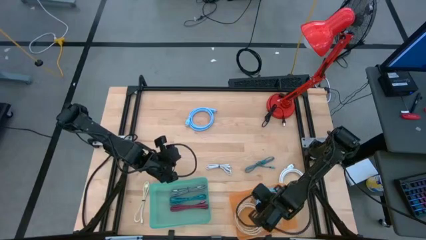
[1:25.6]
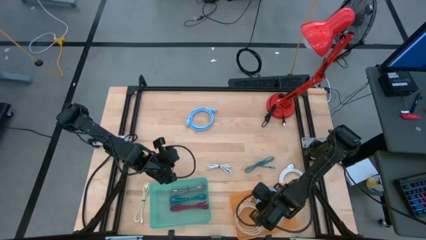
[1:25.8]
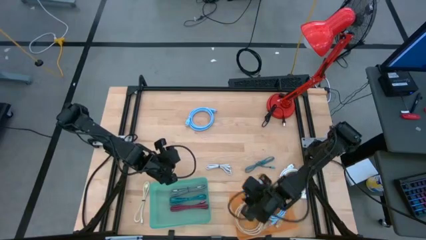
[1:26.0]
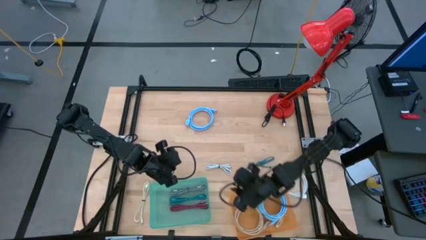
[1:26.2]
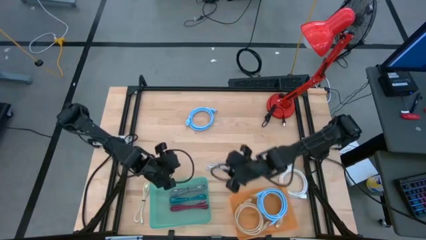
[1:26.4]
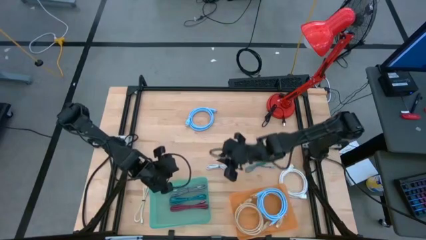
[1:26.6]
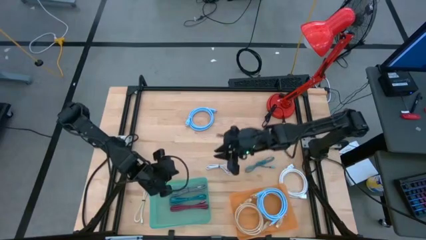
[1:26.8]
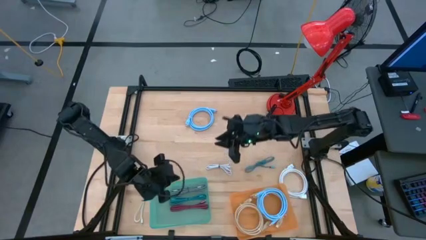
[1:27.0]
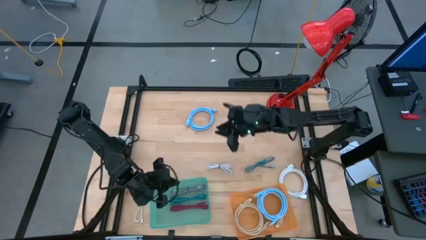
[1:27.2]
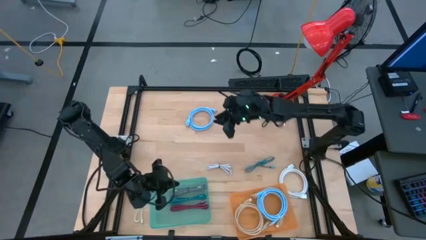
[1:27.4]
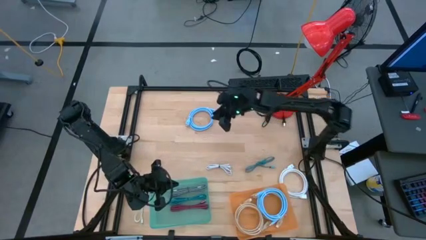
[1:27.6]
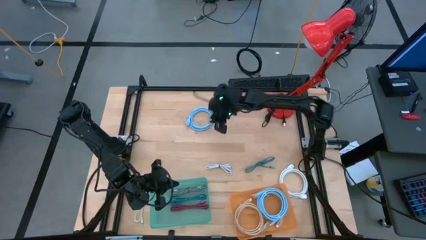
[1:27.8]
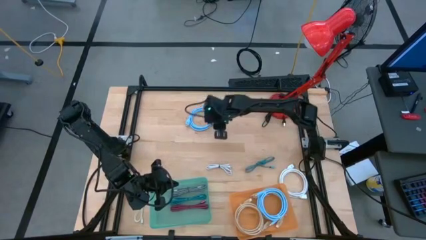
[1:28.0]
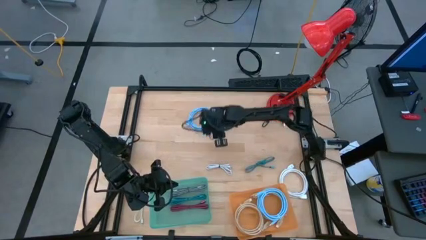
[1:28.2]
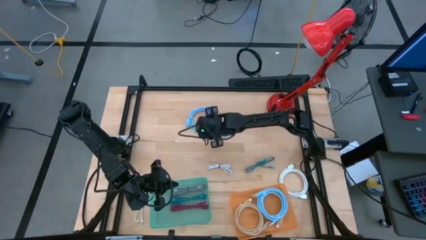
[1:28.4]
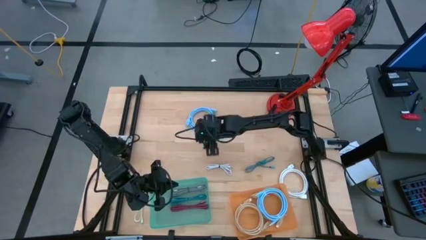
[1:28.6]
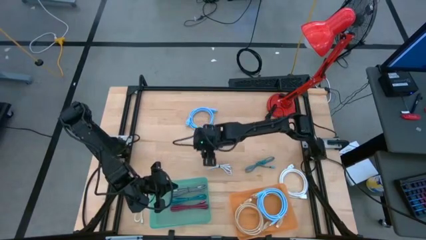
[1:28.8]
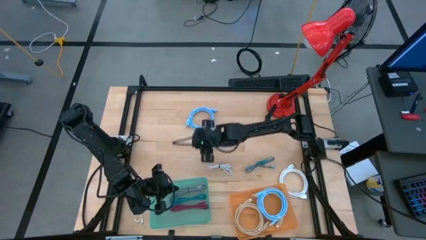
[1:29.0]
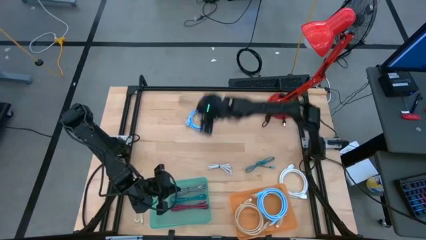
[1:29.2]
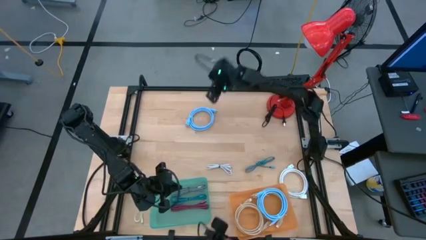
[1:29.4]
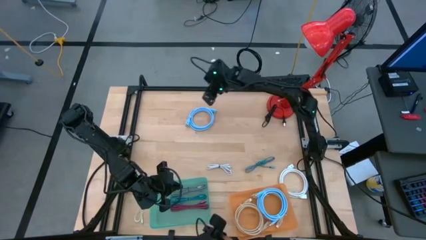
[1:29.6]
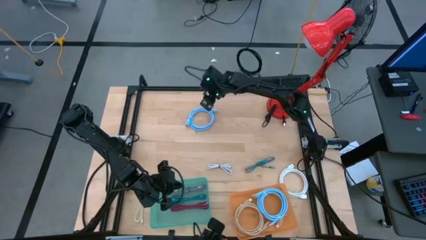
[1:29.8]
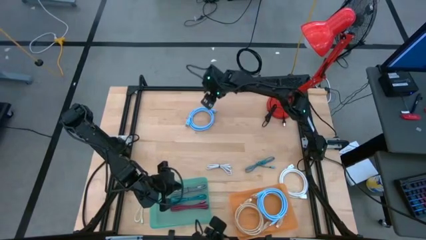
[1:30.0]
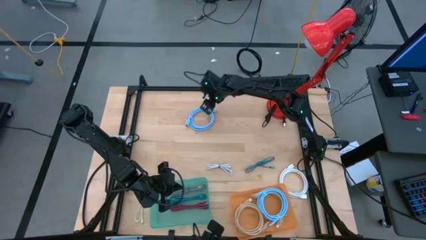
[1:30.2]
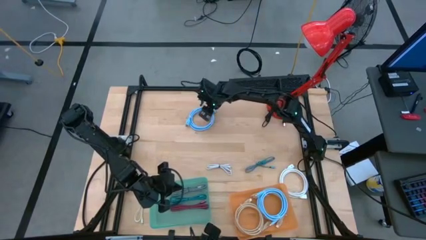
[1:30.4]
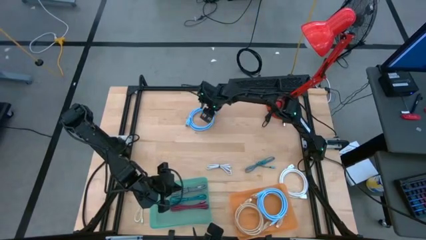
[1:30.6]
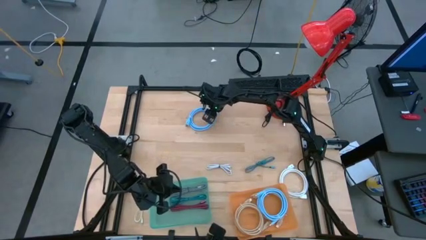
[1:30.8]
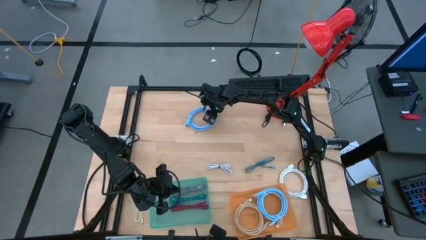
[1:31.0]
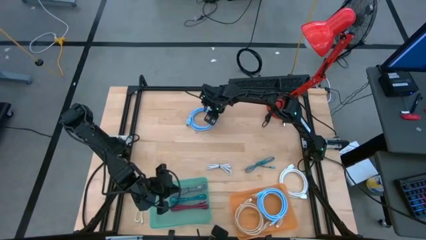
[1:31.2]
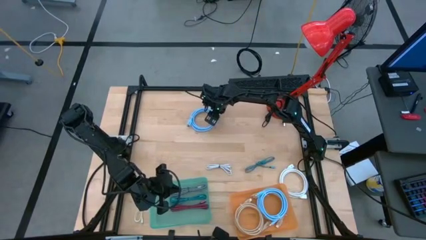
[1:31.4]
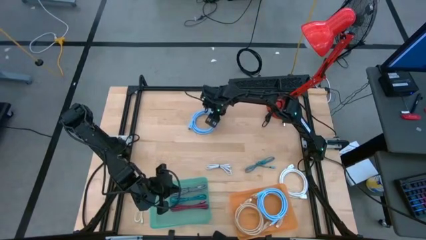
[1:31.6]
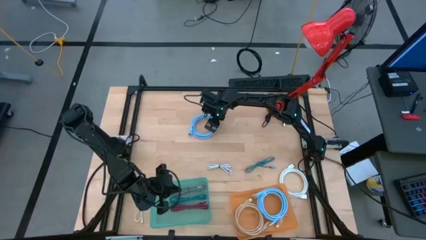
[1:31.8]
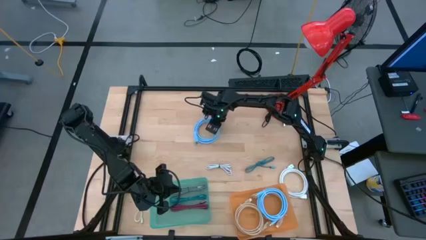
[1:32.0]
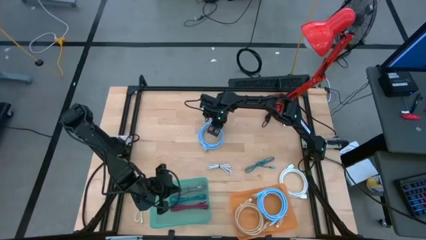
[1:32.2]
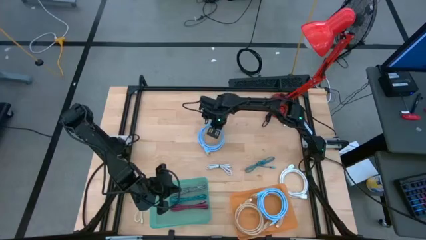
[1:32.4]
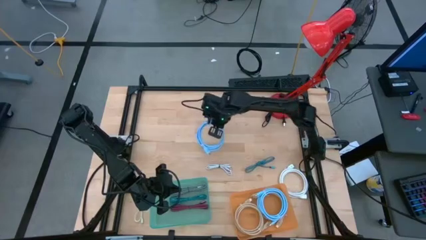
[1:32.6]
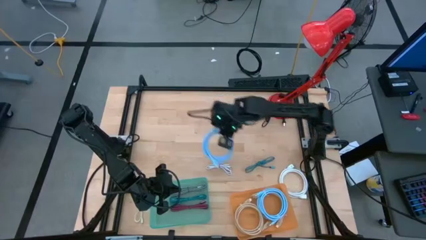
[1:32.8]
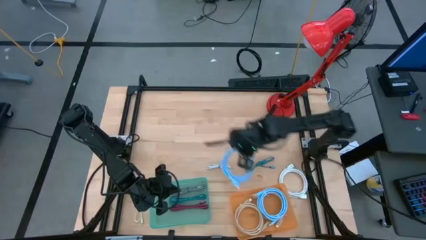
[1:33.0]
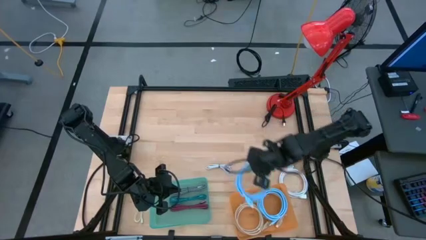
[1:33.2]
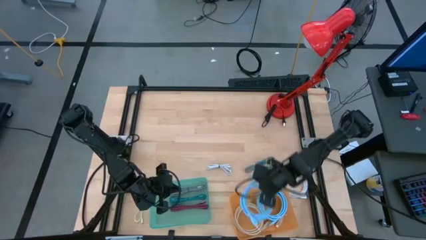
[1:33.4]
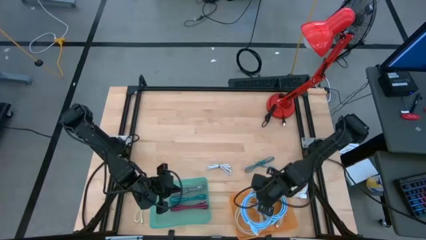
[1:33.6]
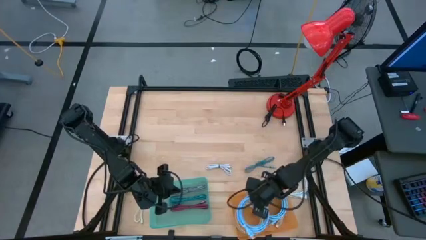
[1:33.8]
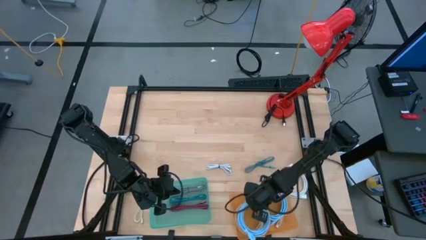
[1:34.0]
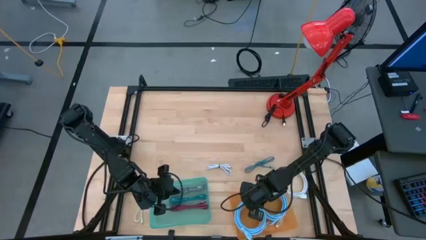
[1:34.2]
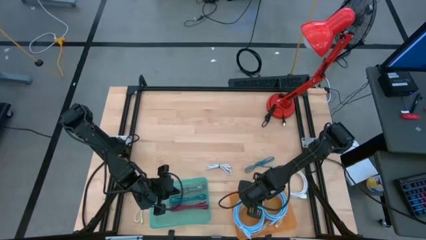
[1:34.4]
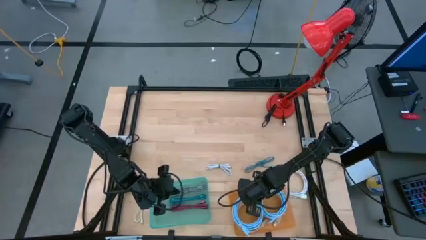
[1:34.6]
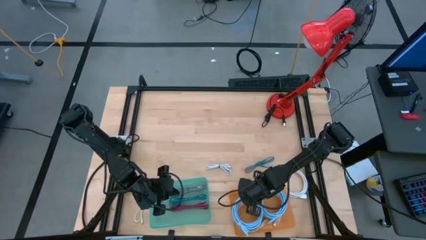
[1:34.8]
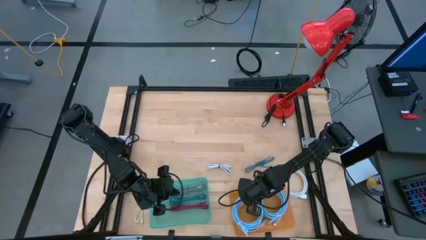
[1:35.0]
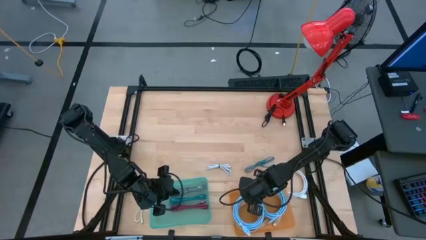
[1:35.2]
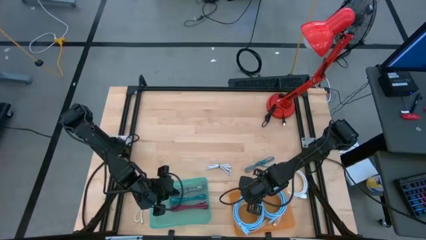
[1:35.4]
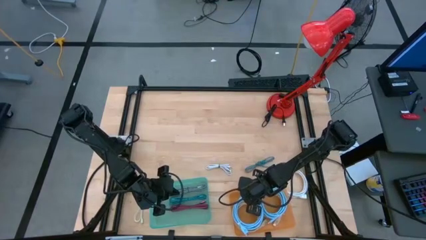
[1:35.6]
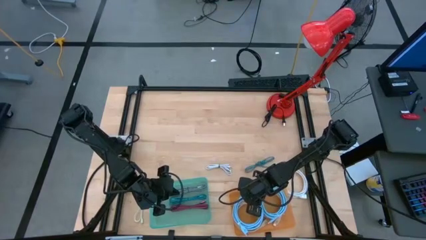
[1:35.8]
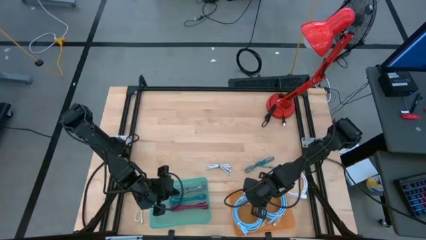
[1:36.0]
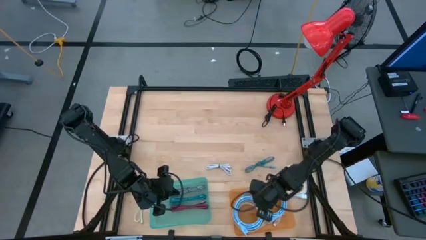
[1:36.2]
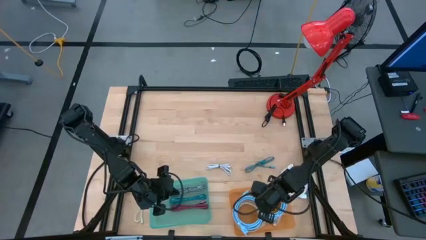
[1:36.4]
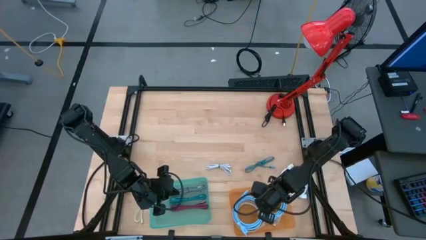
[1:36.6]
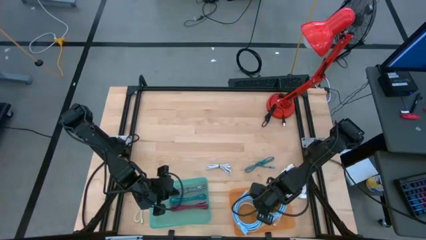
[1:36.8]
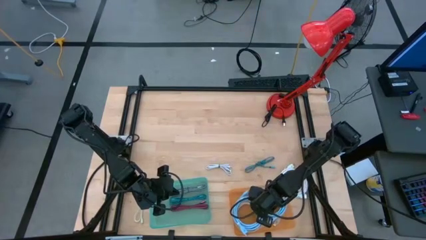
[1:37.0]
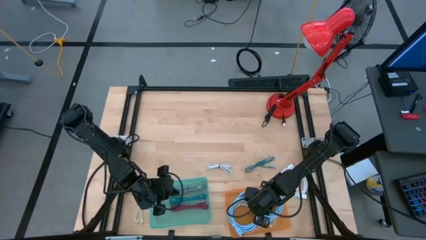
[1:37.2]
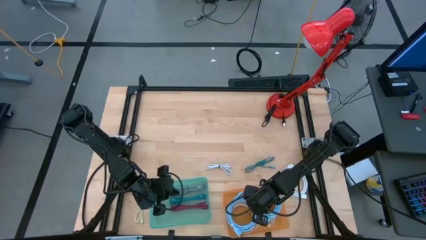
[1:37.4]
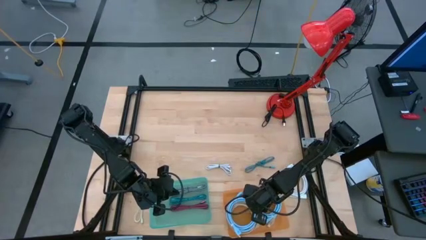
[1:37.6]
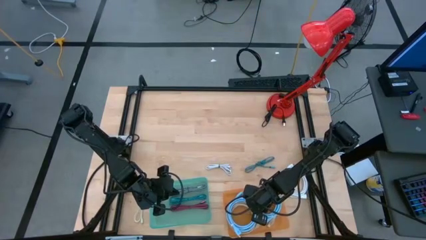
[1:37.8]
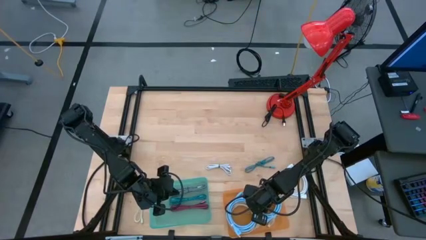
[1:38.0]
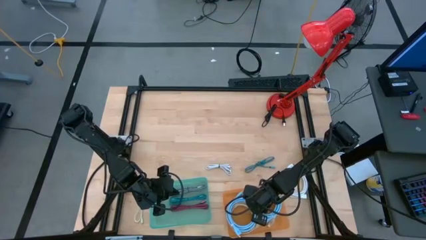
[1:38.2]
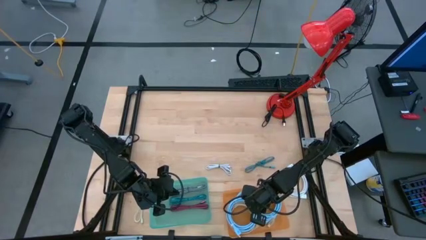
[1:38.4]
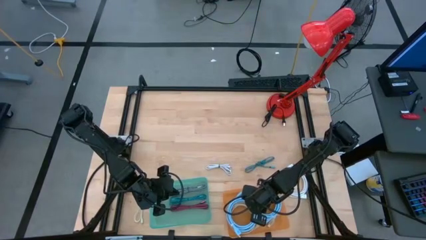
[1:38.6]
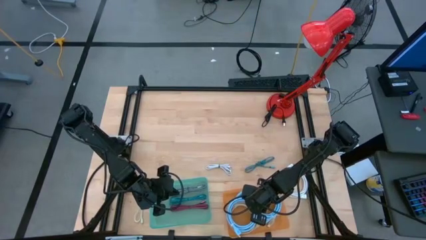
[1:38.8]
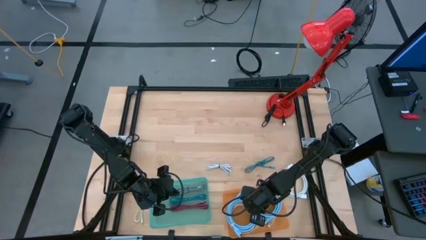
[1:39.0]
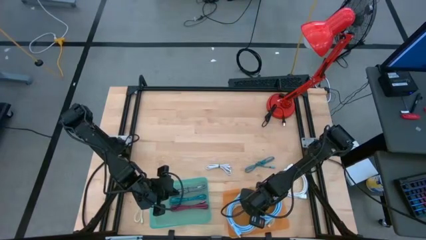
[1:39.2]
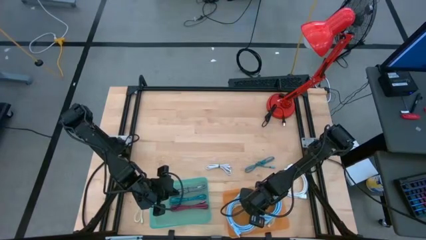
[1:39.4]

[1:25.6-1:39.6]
Task: Pick & Place USB Port
Put the light blue HDMI cable into the orange bin
